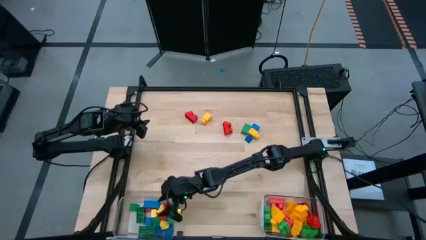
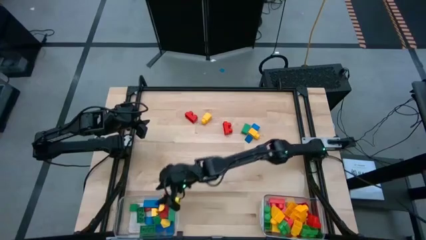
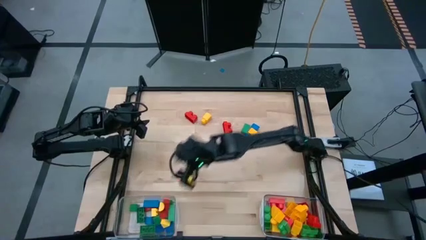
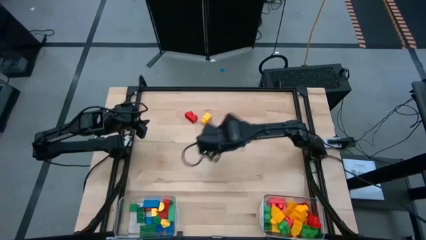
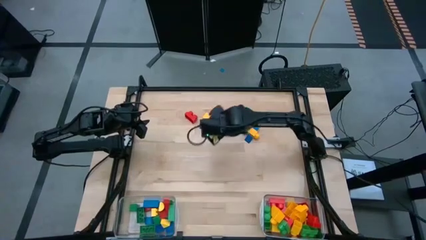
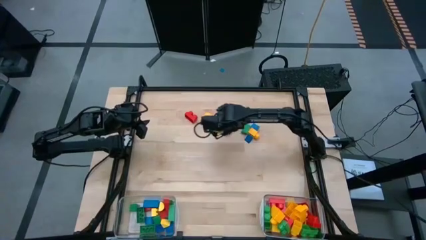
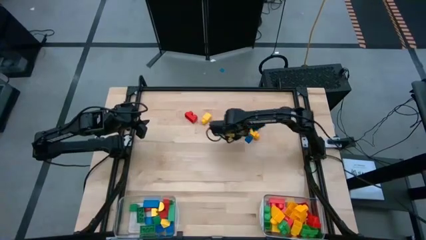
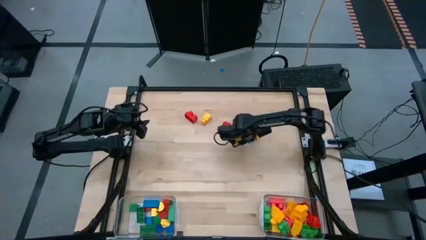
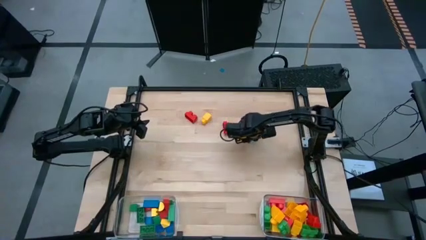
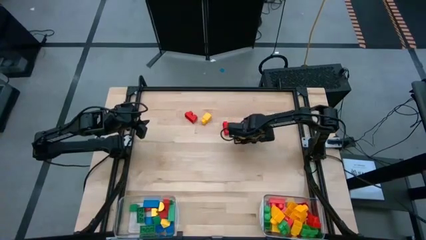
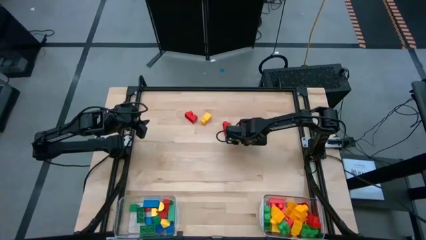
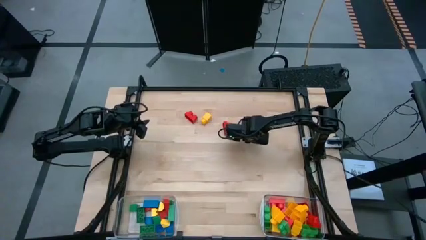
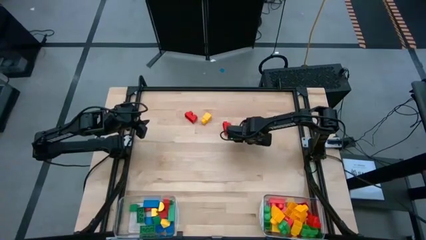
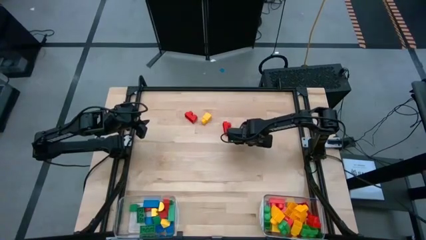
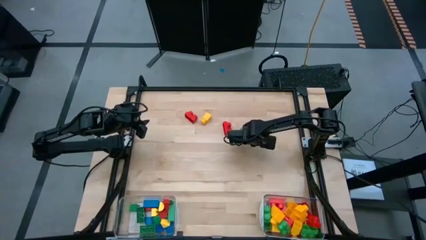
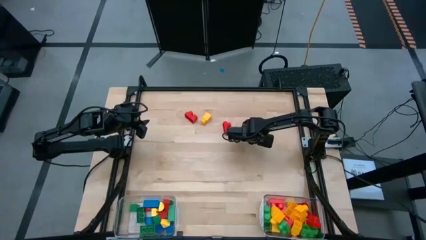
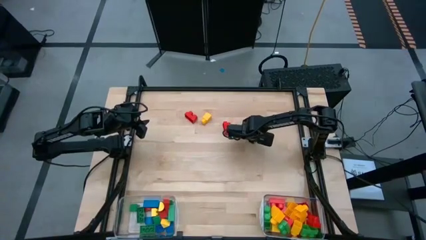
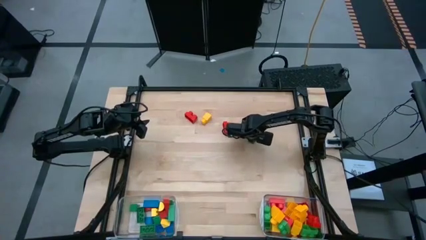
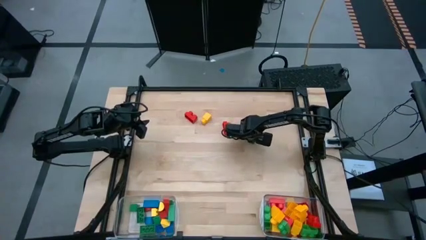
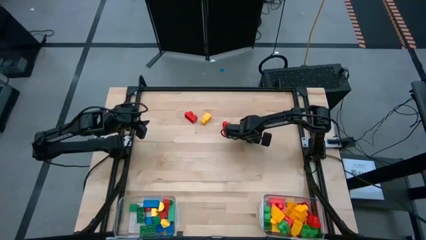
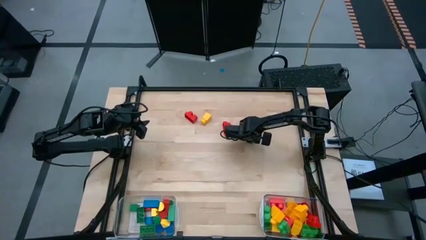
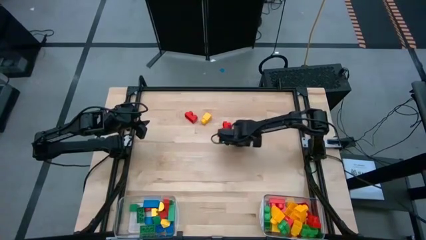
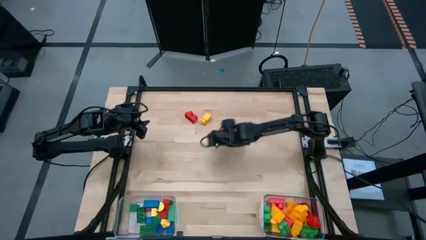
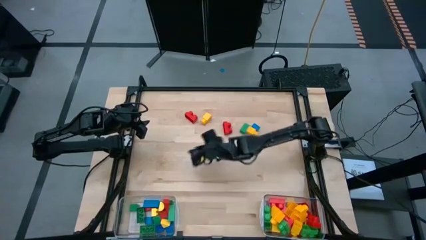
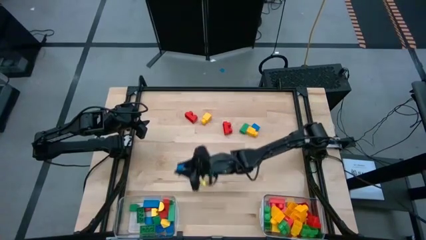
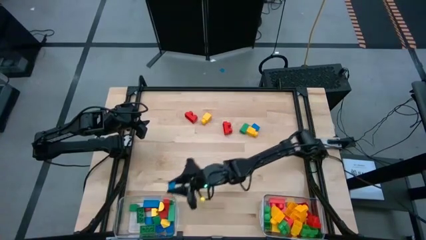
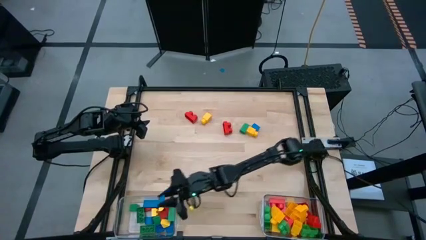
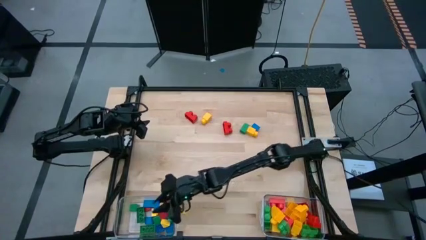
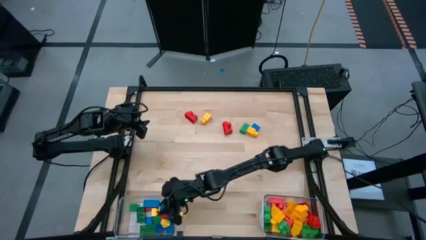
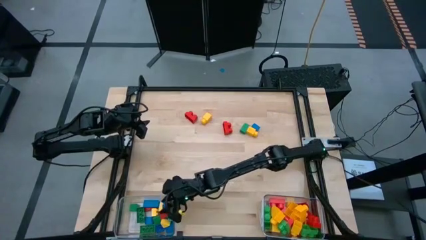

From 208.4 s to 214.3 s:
Task: Sort blocks by size
Put the blue triangular block into the left transparent bin

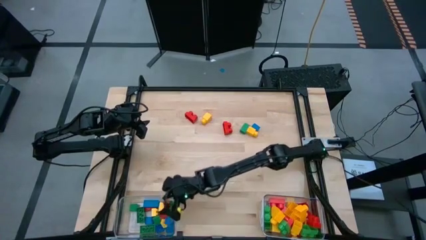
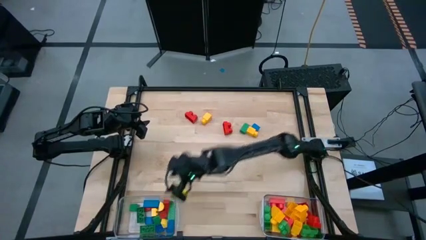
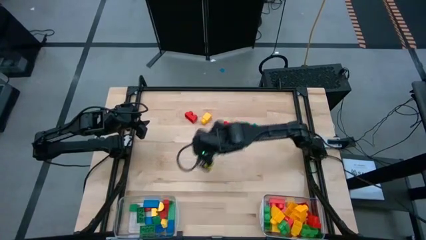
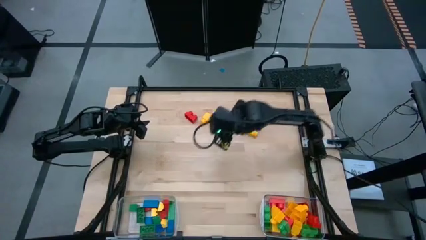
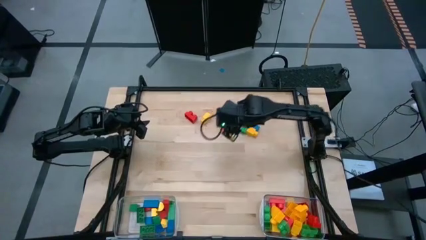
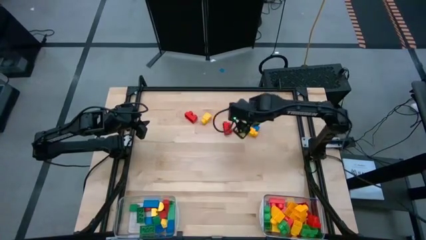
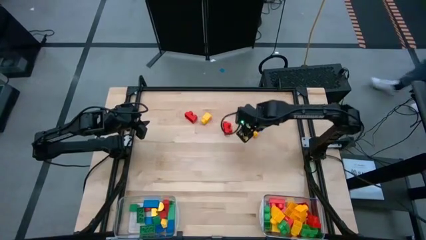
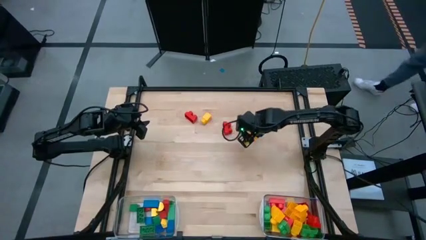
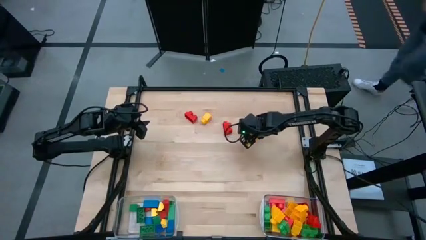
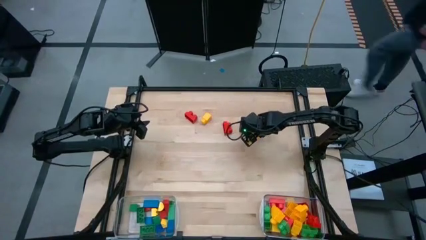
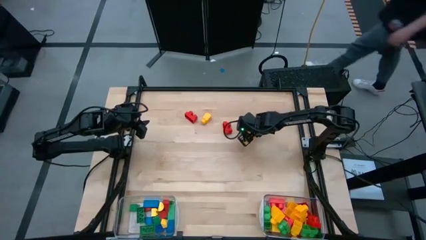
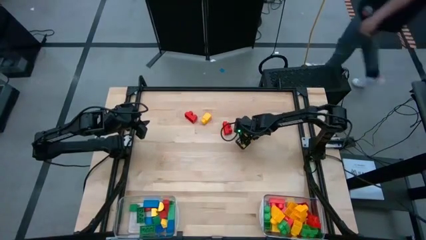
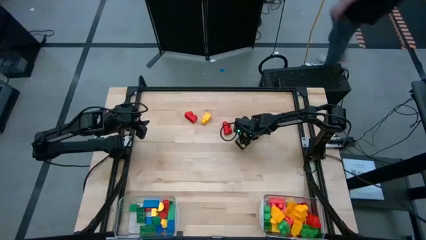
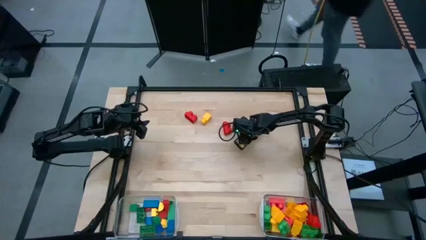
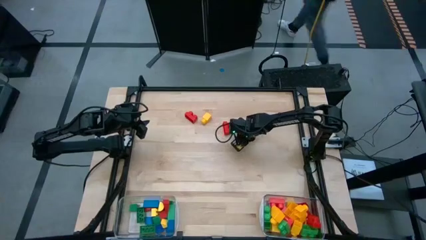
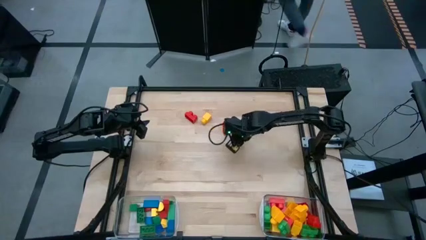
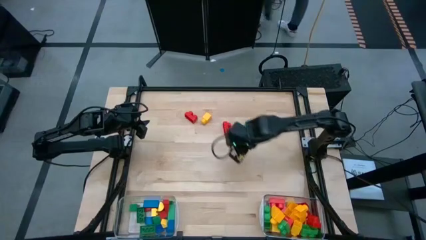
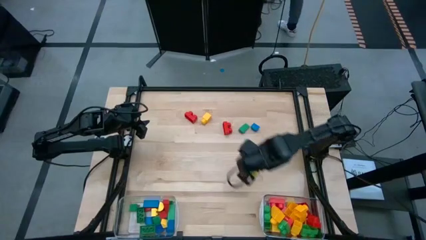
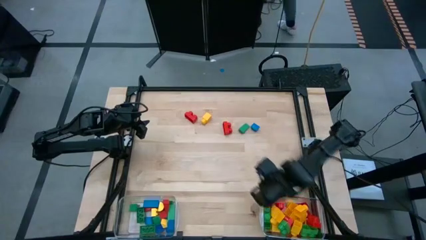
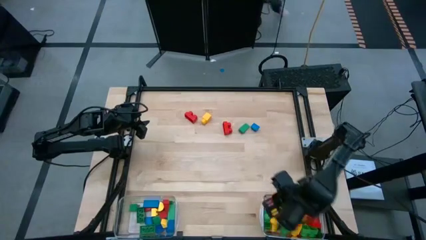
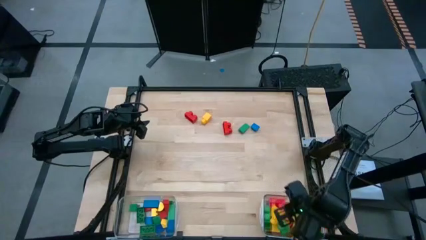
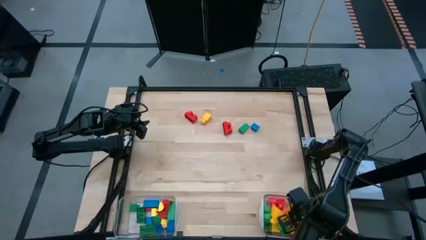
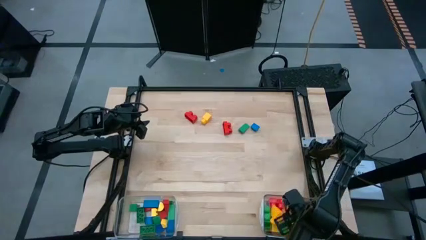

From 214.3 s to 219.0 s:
Put the yellow game piece into the right transparent bin

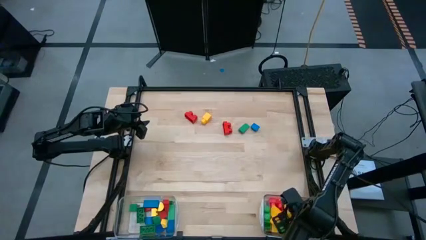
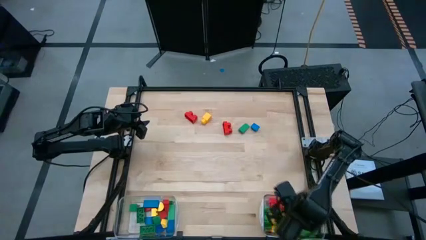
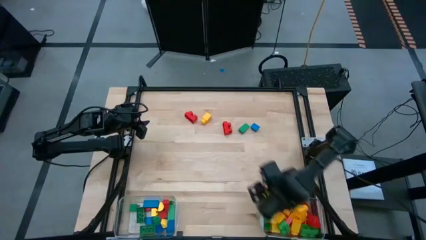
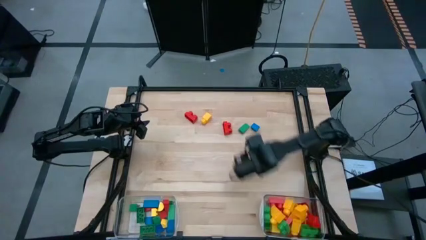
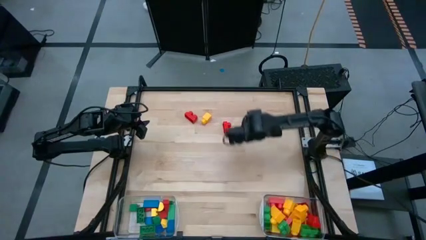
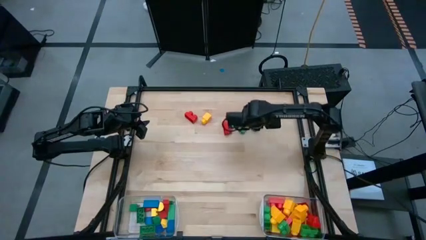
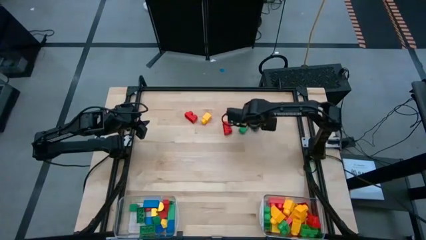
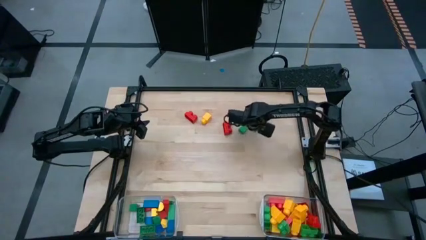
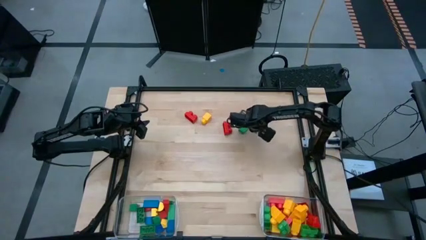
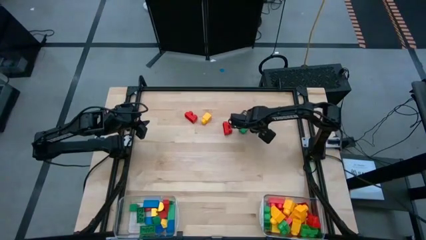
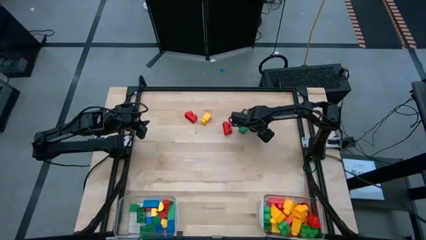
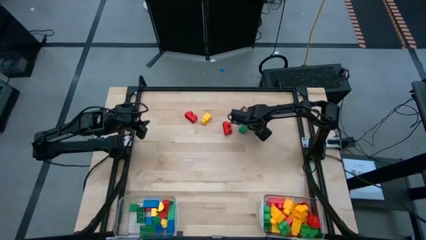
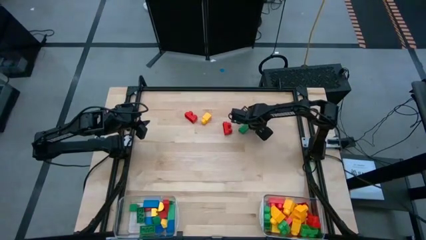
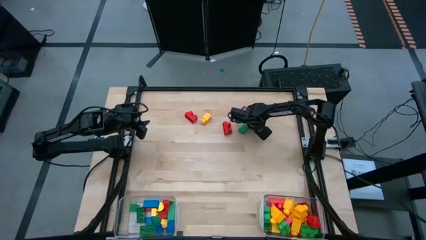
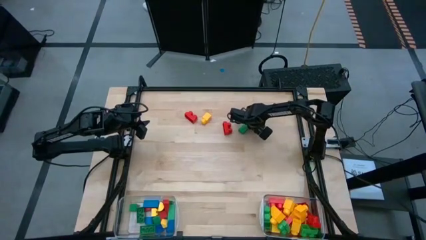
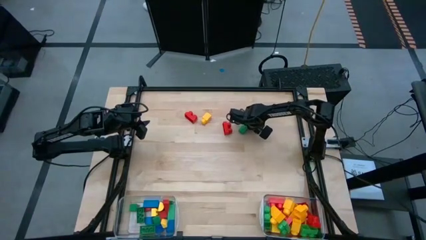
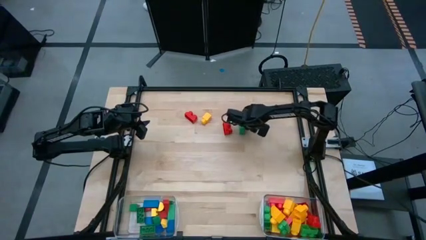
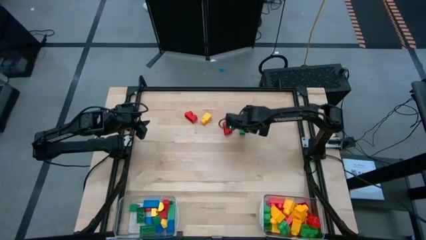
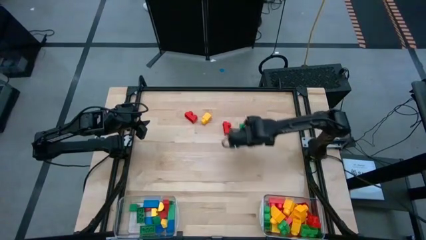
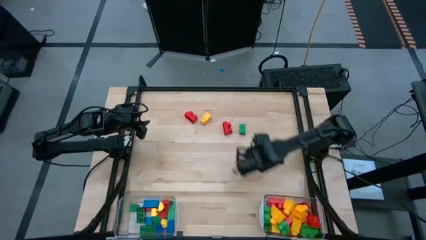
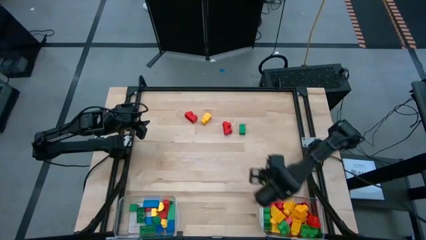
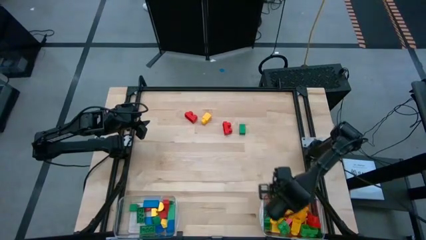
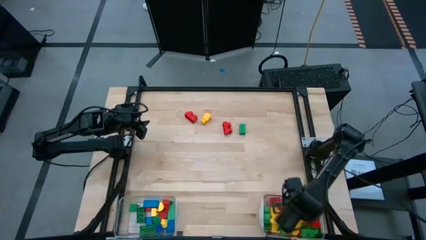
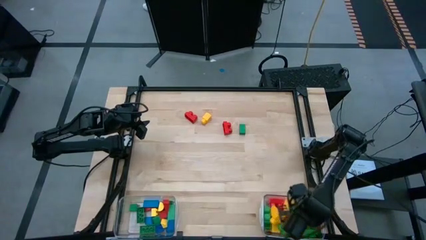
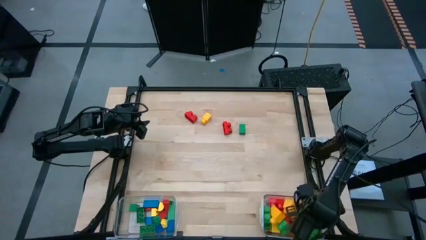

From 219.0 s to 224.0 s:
Put the blue half cylindrical block into the right transparent bin
